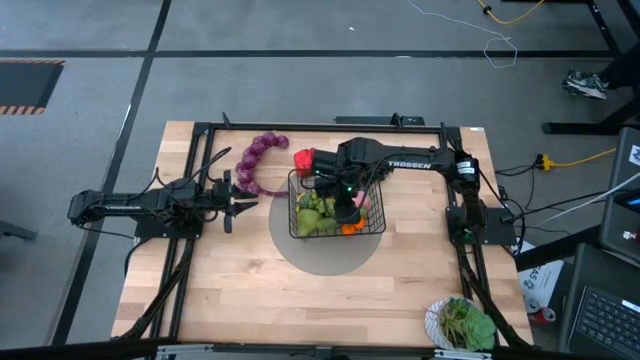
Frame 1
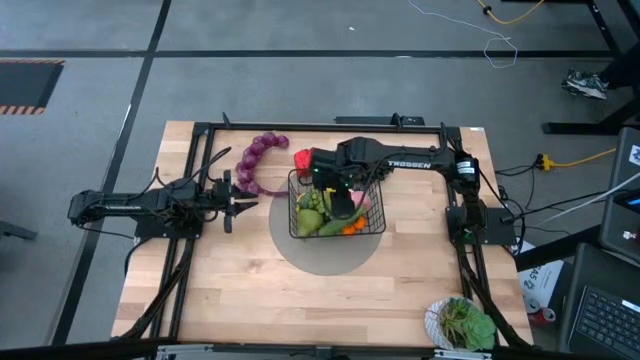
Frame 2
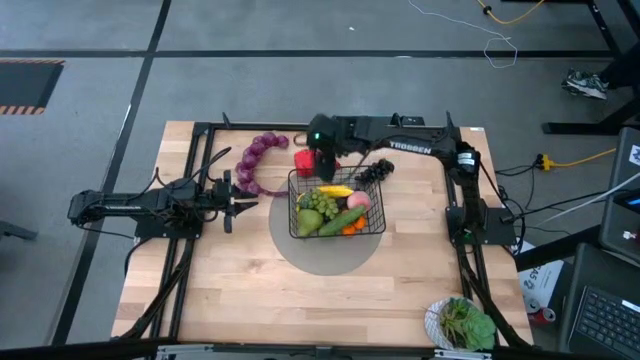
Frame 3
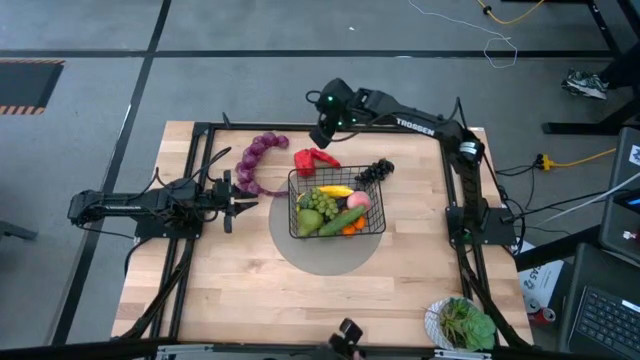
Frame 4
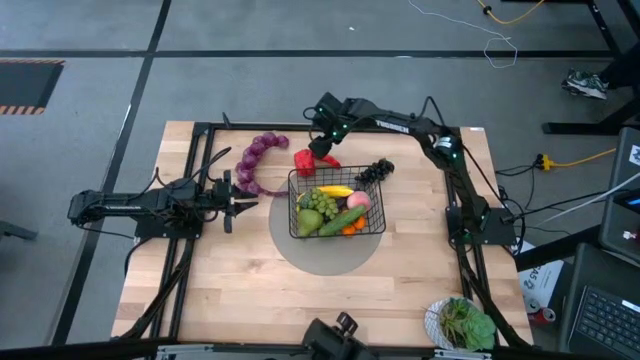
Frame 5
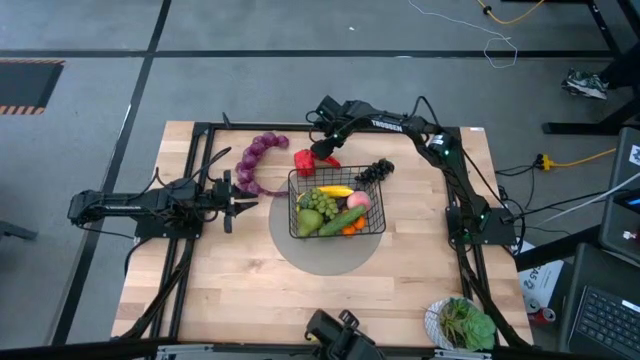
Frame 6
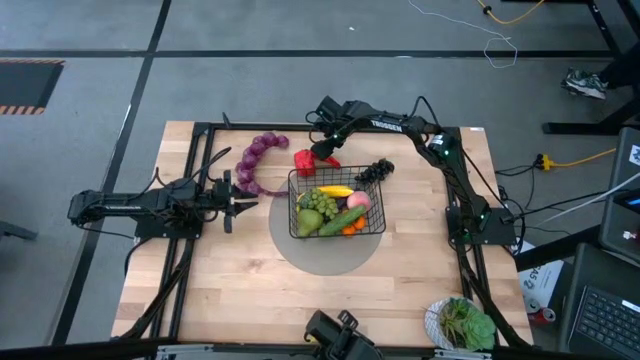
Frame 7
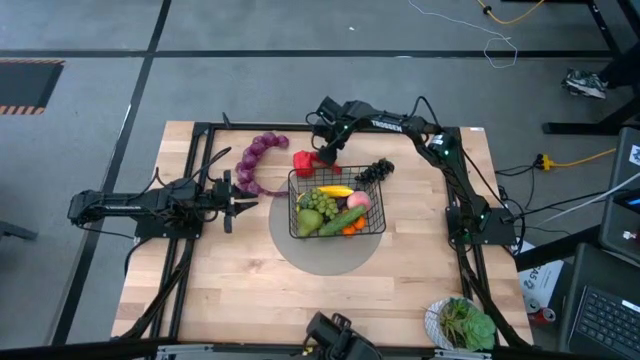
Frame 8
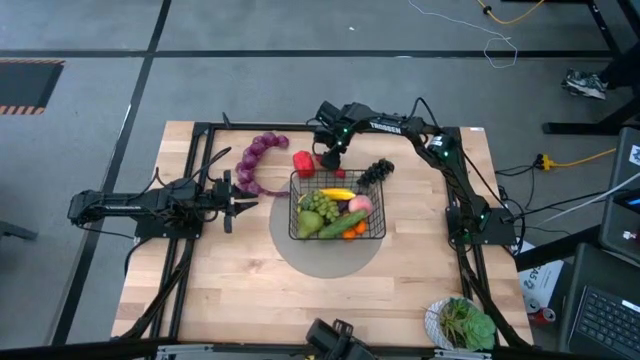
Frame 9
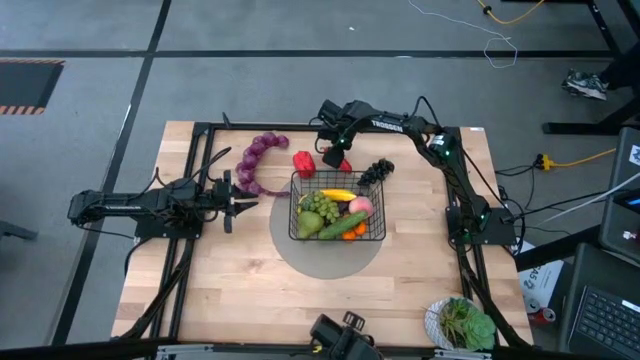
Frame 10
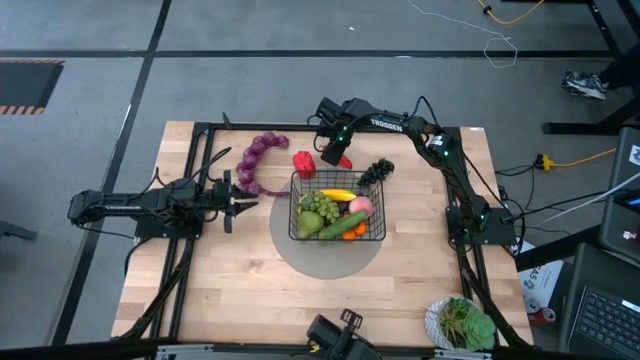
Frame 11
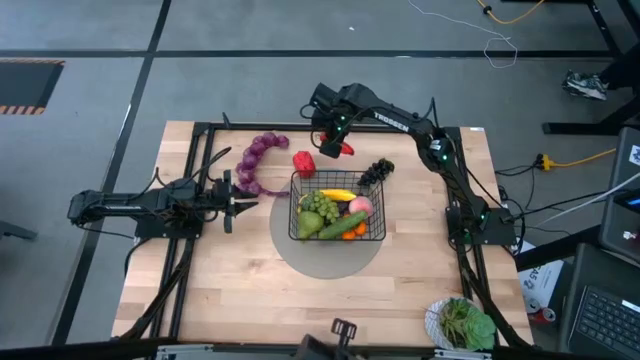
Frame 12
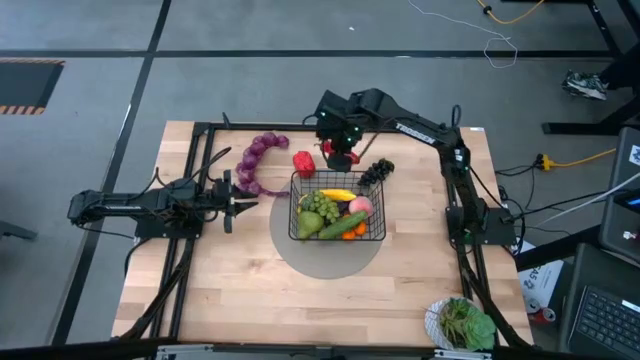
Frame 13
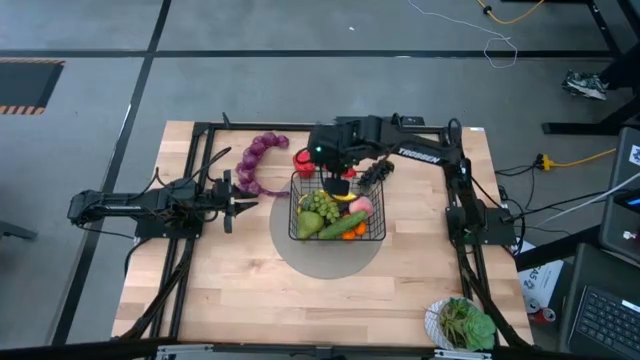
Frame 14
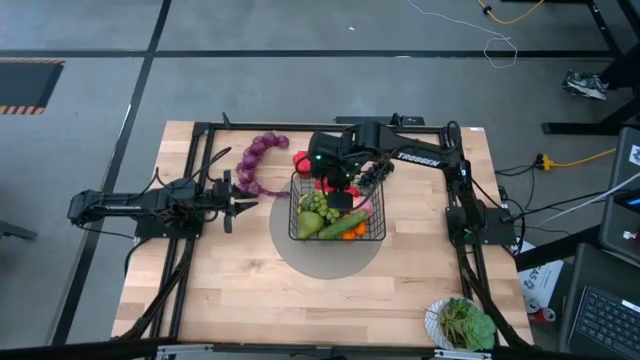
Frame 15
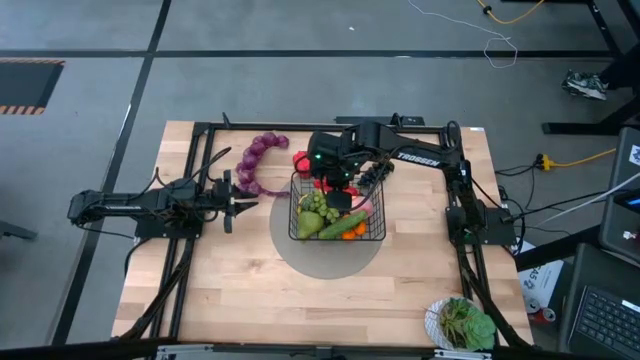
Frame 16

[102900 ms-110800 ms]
Task: Build produce basket
Put the red chili pepper into the wire basket

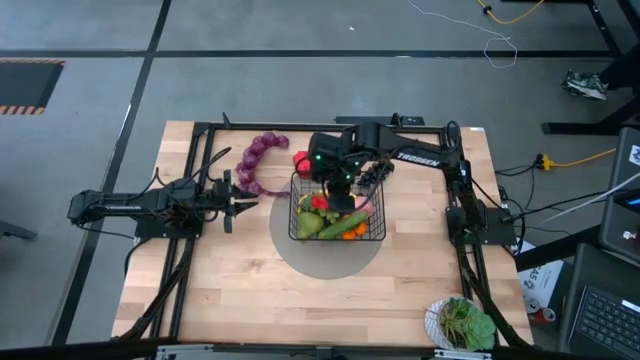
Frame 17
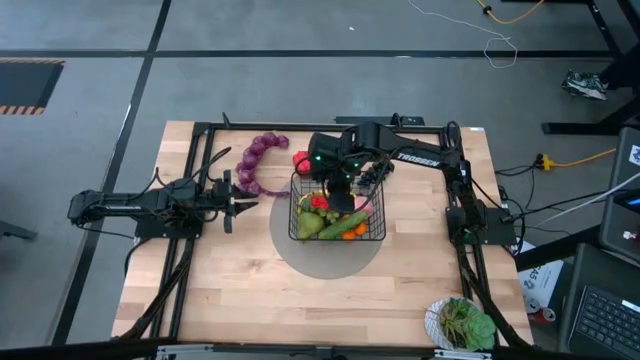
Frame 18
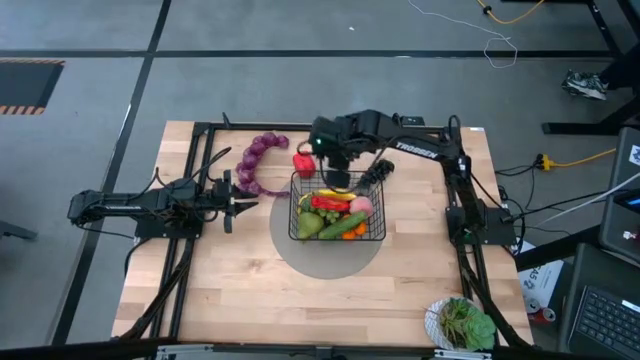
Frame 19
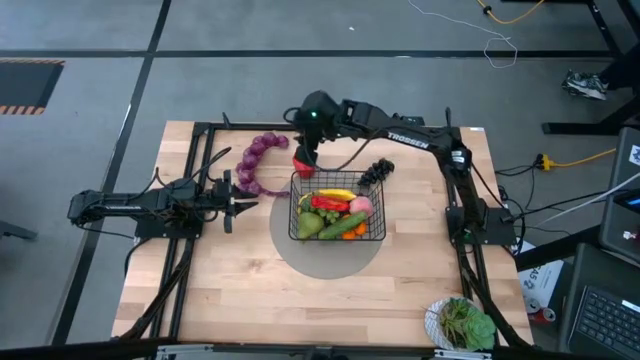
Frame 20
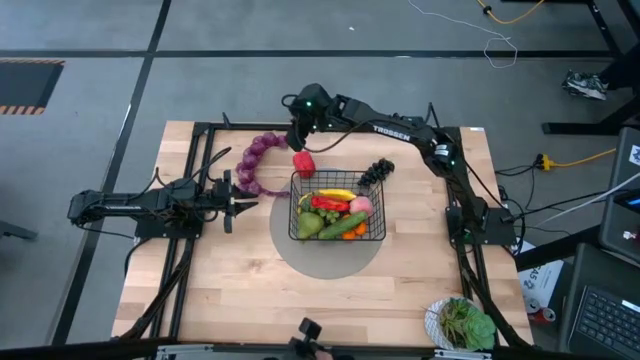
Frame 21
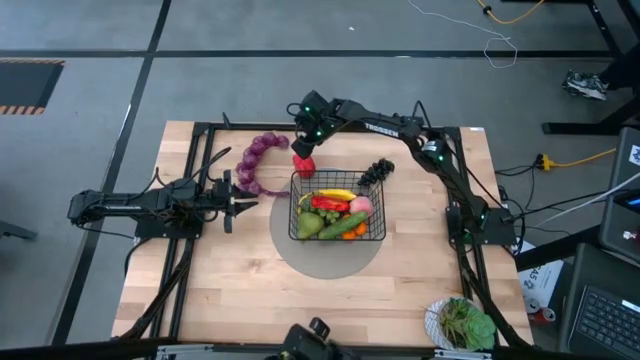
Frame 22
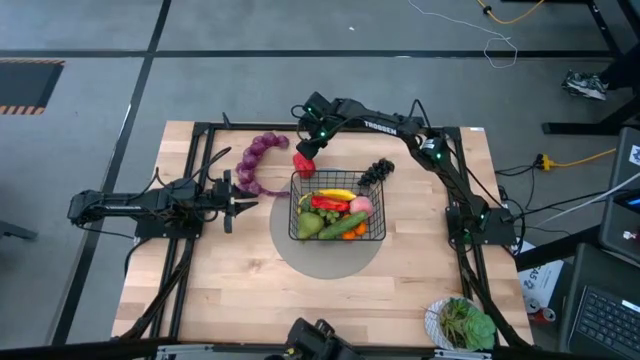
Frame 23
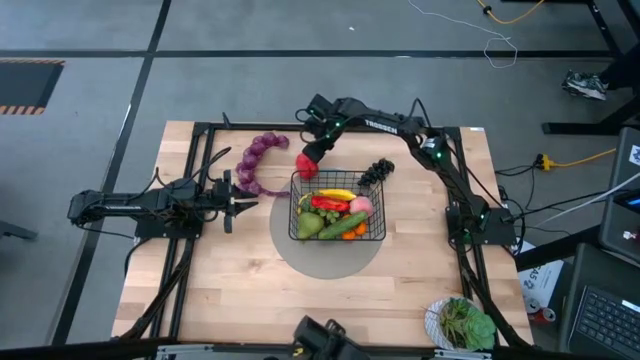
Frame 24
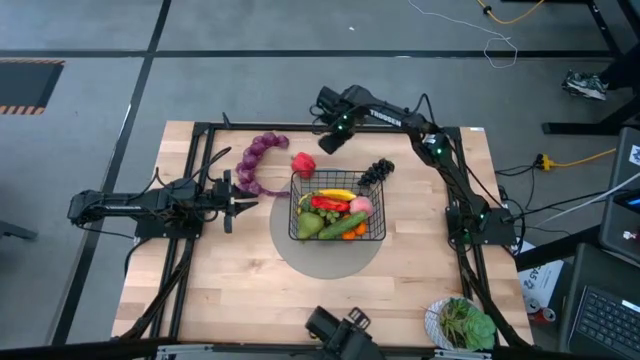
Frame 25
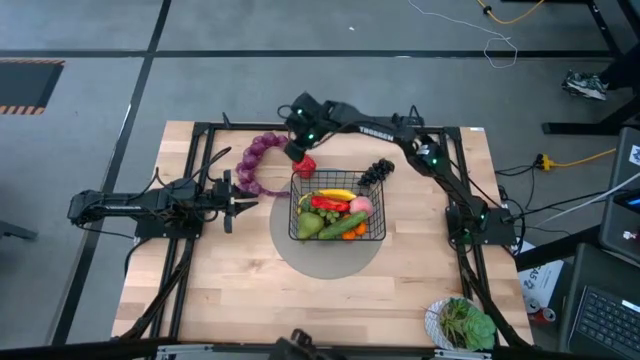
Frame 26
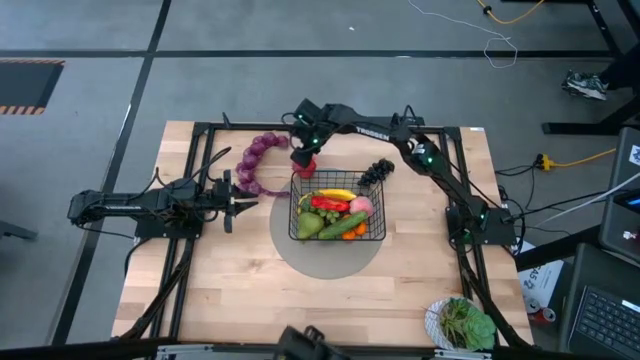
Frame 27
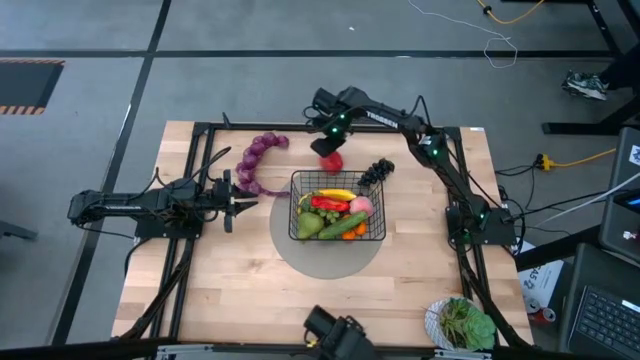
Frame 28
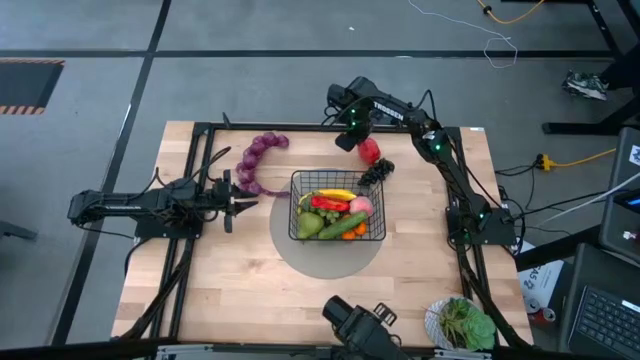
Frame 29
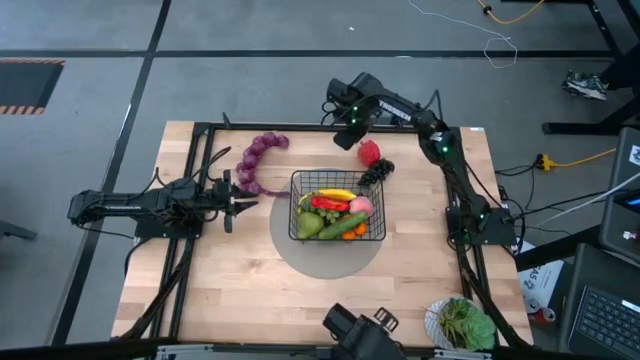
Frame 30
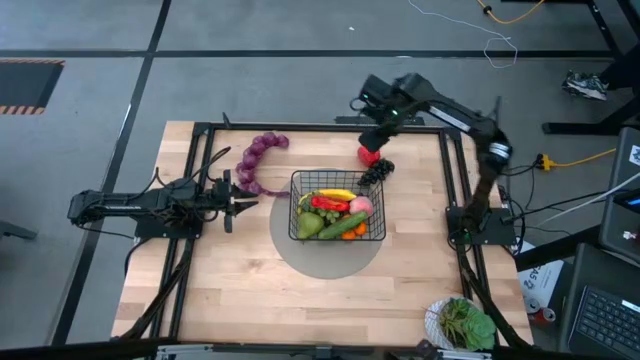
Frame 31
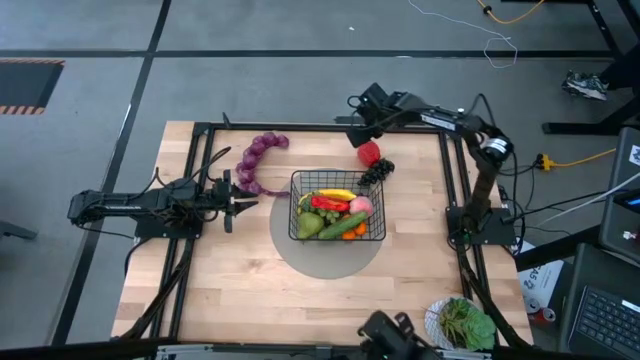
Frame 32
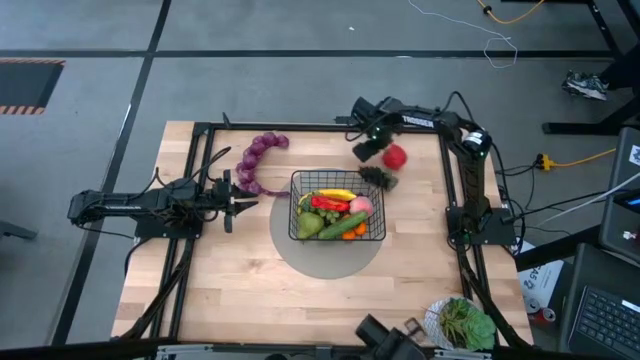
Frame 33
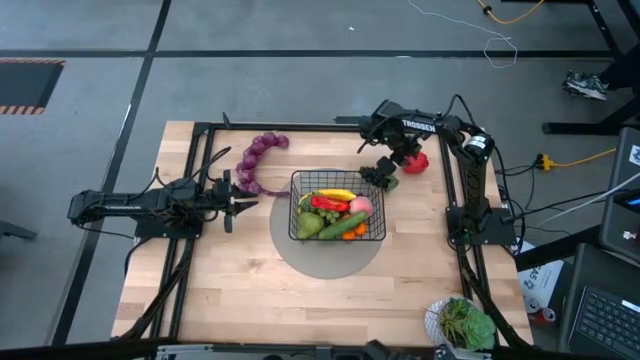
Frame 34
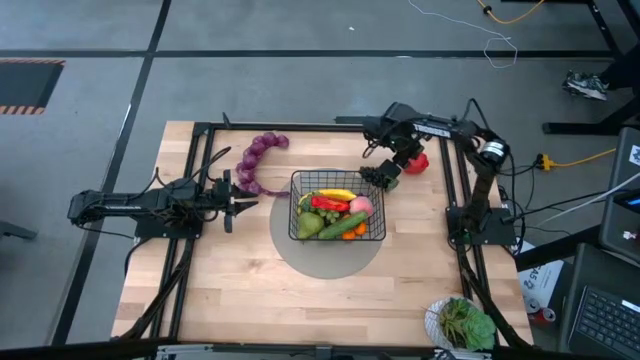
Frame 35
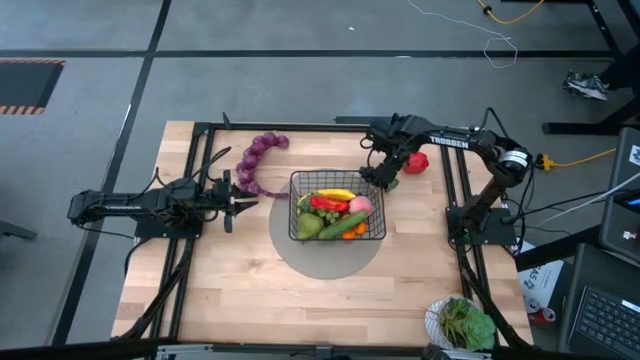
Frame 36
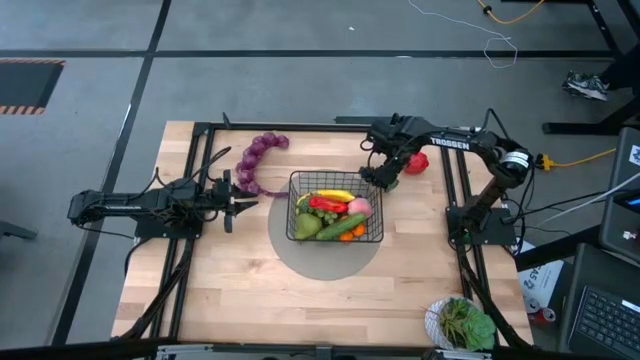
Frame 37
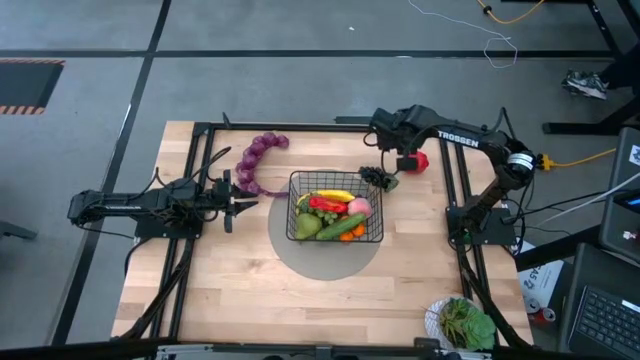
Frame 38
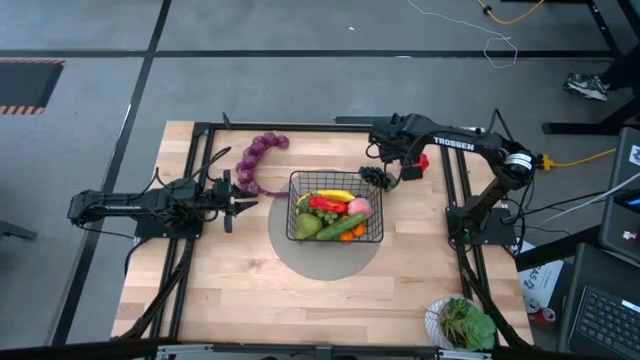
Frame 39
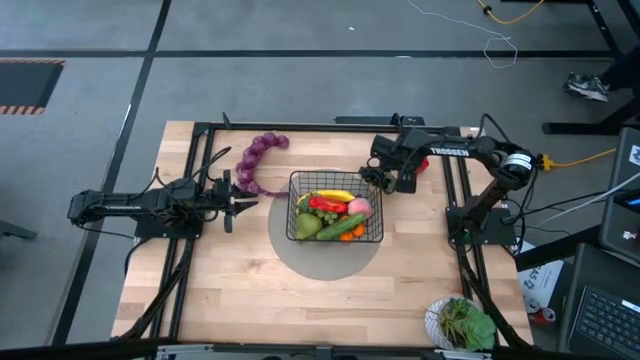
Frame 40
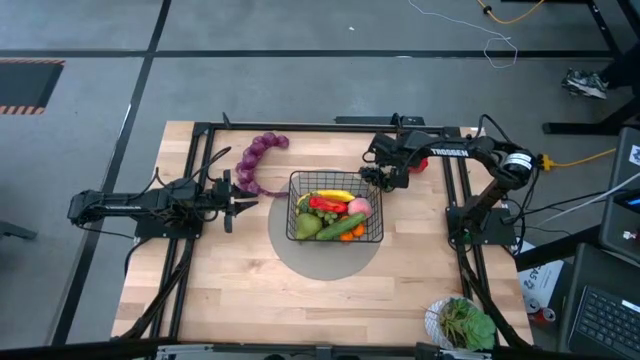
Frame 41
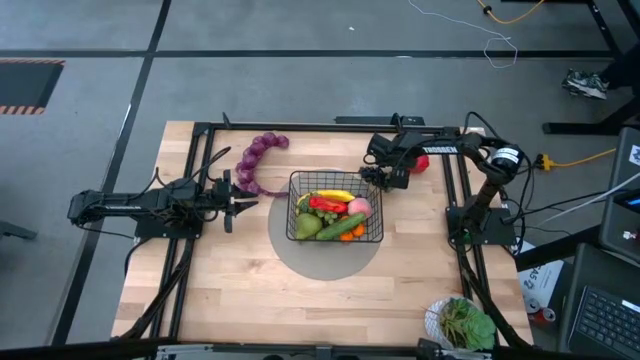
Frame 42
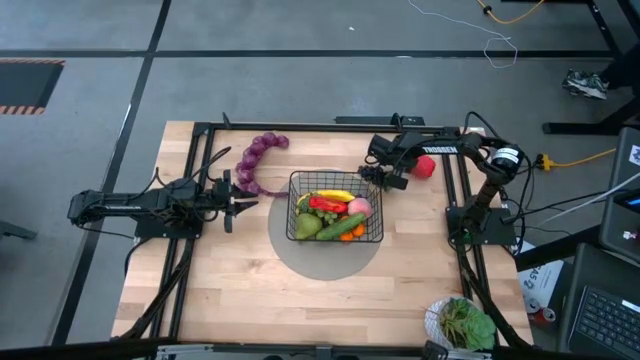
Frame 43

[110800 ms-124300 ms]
Put the red bell pepper into the wire basket
